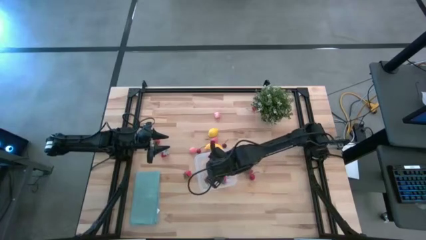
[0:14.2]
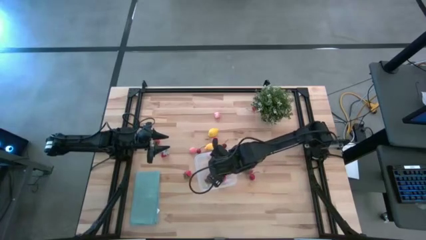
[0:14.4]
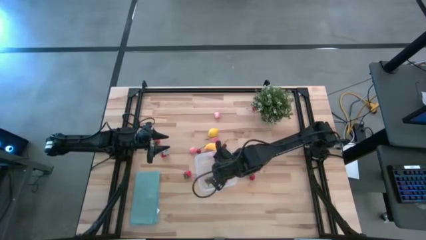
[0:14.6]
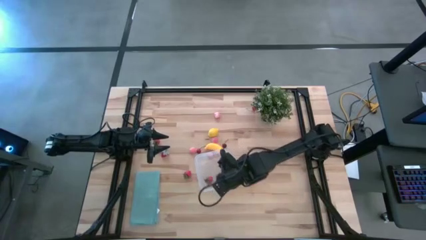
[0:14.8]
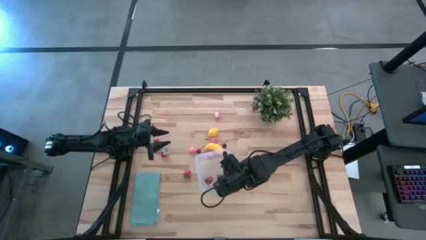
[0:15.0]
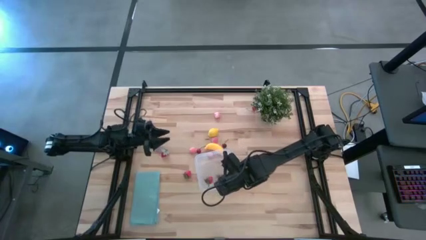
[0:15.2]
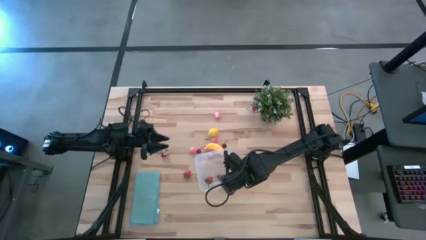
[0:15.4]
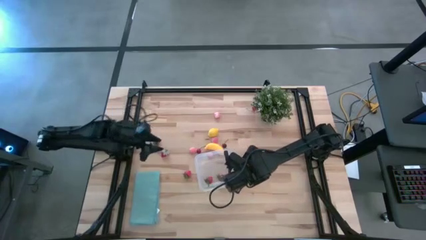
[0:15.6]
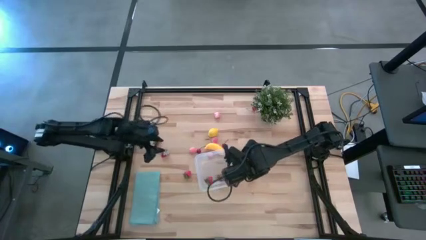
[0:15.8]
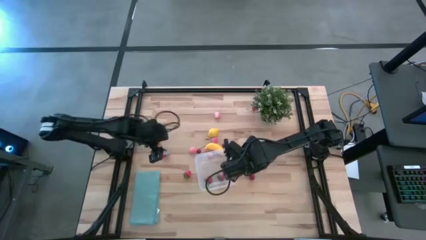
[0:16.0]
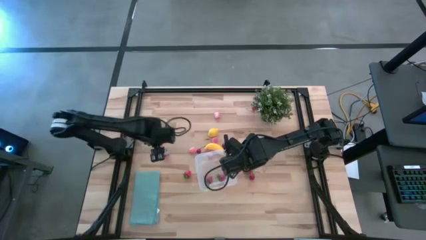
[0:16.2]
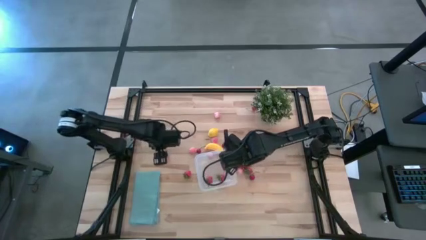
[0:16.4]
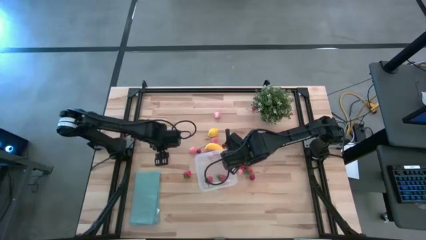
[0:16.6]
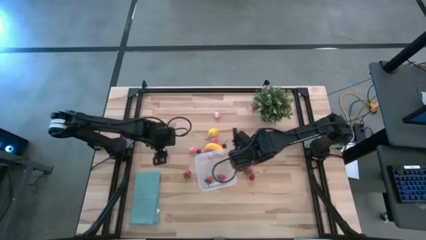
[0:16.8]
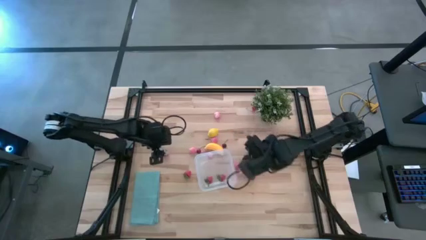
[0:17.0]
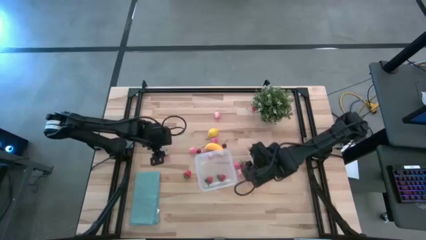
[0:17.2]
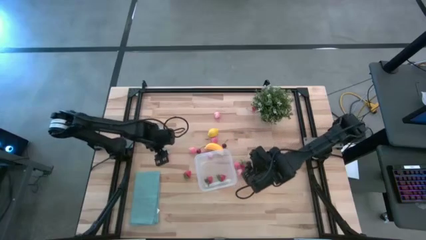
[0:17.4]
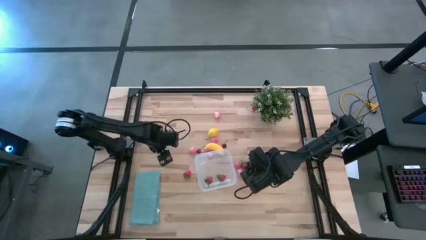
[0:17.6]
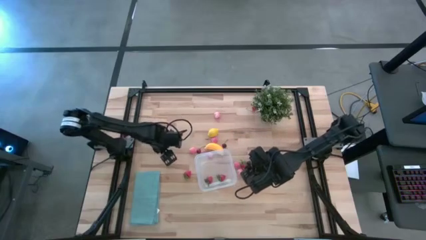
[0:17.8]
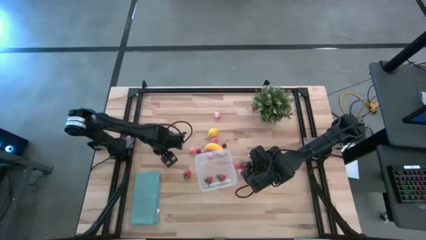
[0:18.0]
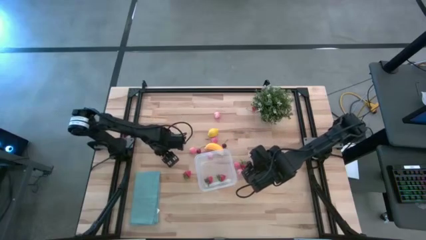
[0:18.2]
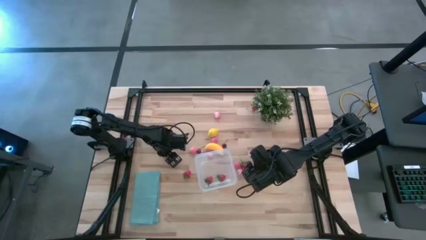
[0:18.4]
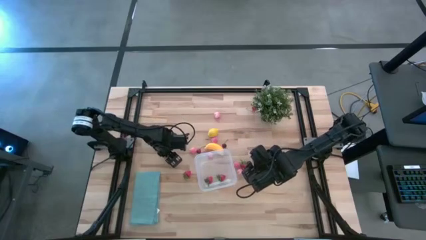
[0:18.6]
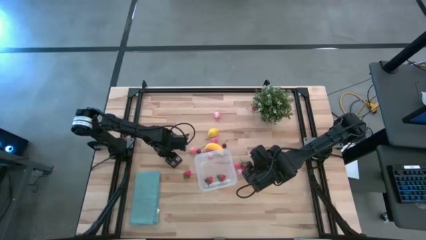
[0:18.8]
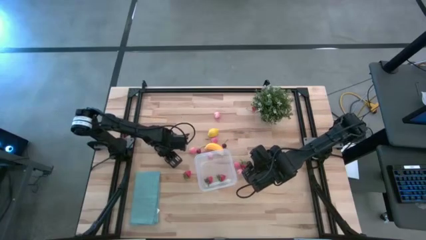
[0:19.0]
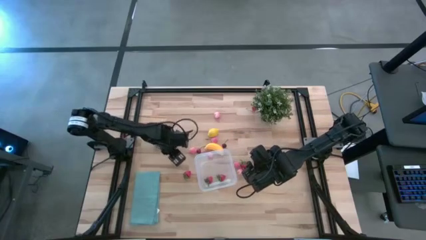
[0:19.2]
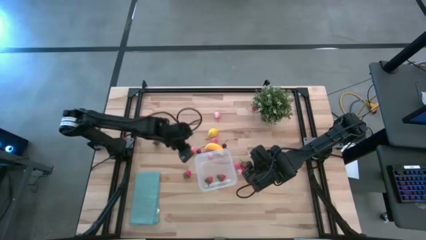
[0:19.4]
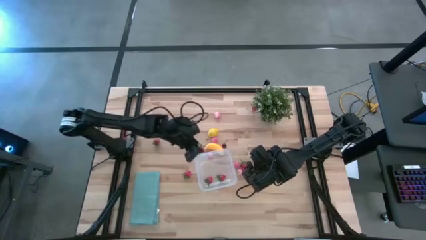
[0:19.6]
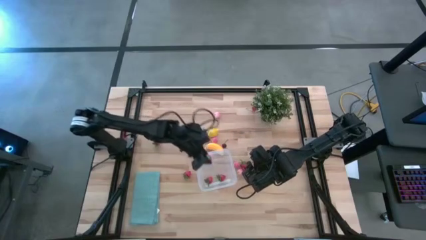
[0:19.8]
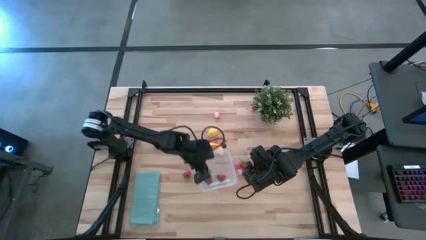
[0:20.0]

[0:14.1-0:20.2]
Task: Pick and placing Produce into tupperware
Put the red strawberry into the transparent bin

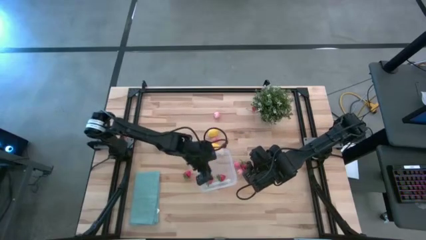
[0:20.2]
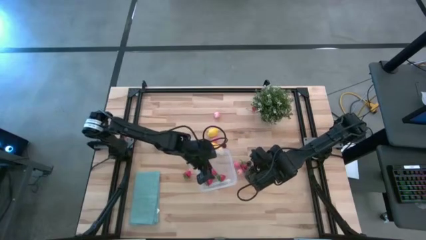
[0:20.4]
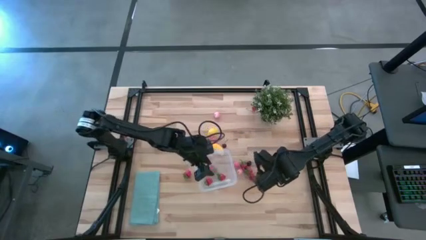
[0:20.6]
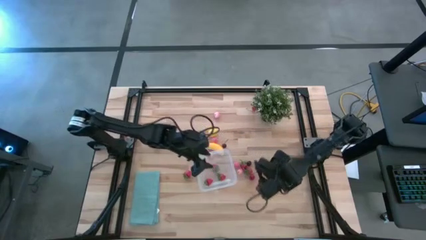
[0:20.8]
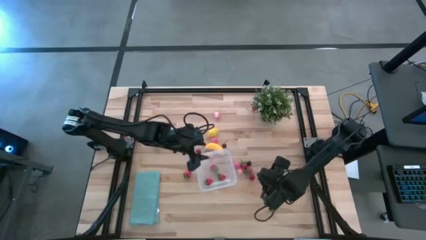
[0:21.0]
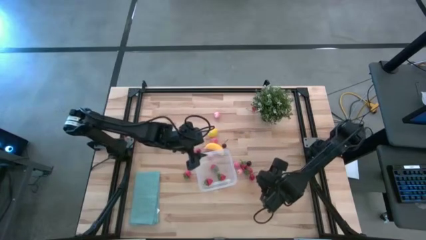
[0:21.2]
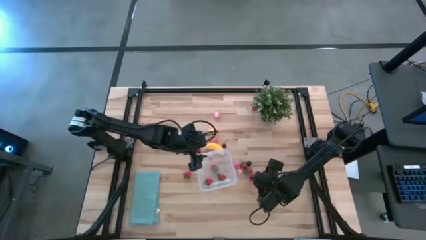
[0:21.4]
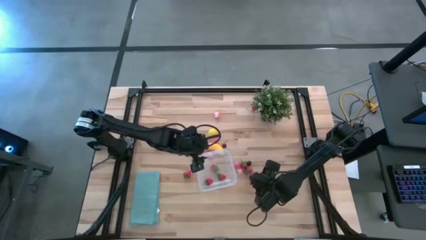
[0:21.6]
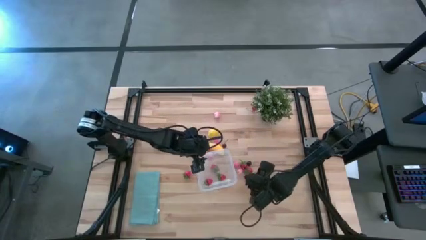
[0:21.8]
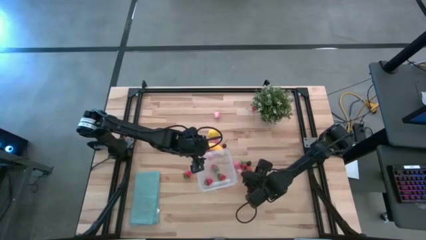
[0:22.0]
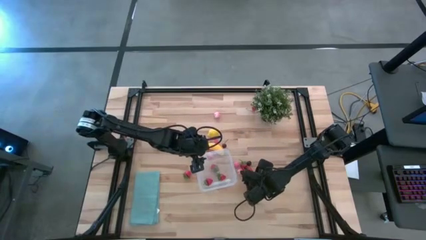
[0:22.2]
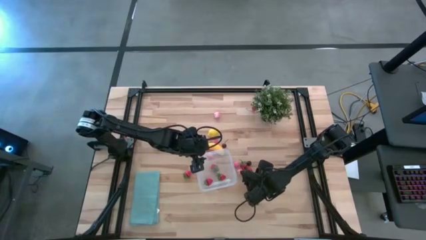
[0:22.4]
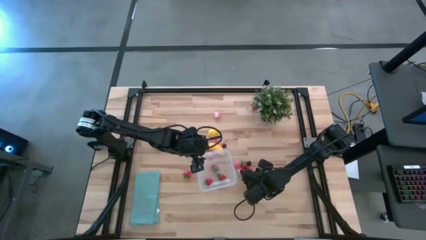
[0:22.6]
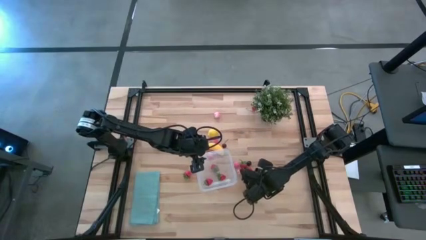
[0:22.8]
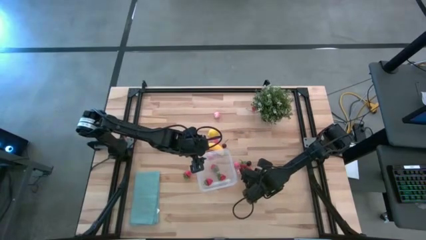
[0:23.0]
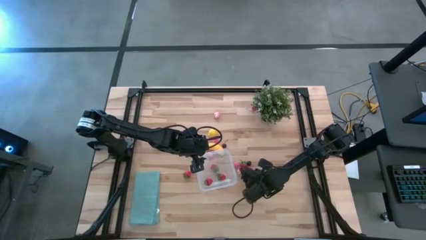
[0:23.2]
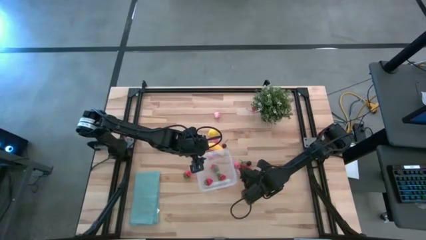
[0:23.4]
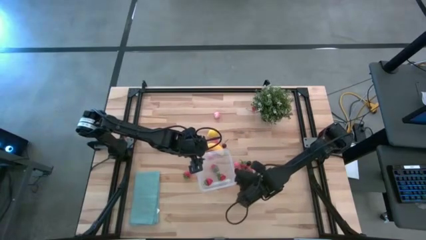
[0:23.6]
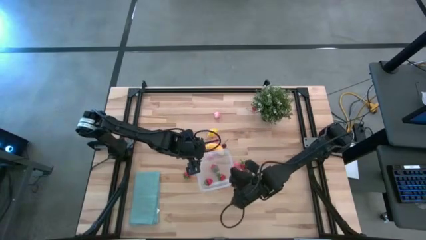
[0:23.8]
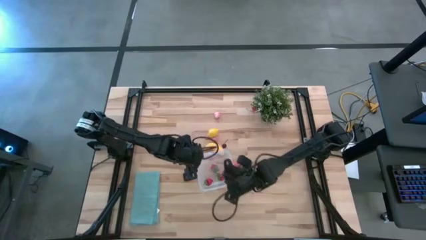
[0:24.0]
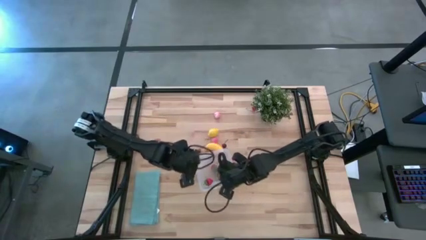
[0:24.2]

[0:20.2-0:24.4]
Put the red cherry into the transparent bin

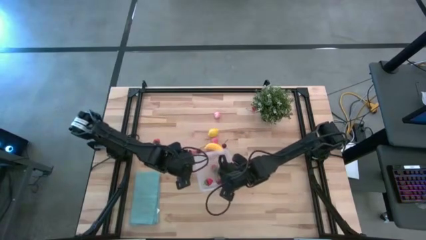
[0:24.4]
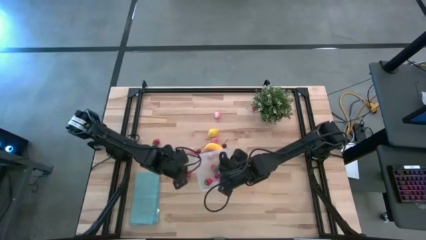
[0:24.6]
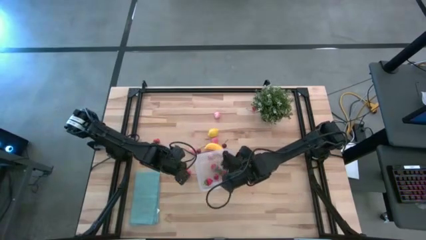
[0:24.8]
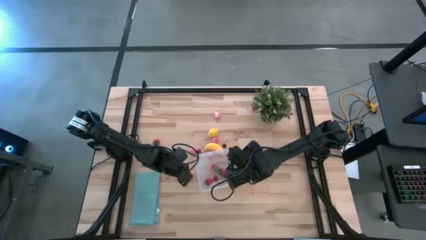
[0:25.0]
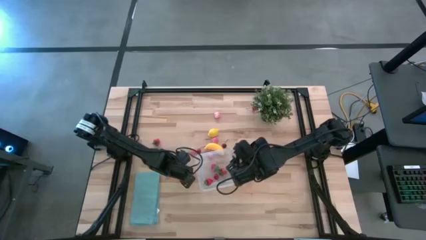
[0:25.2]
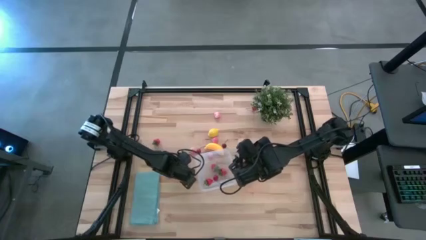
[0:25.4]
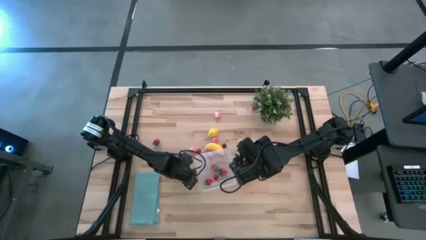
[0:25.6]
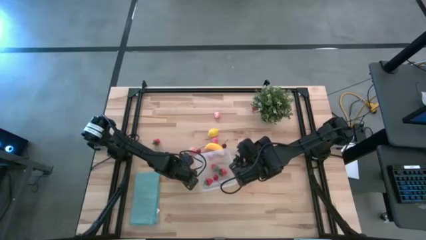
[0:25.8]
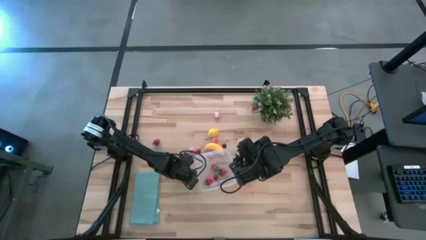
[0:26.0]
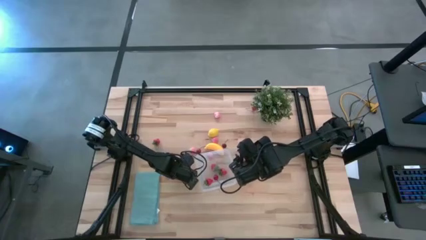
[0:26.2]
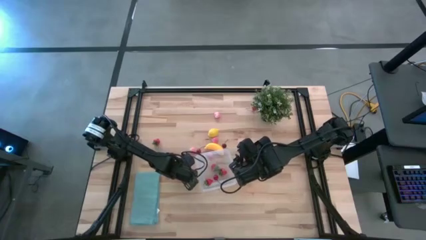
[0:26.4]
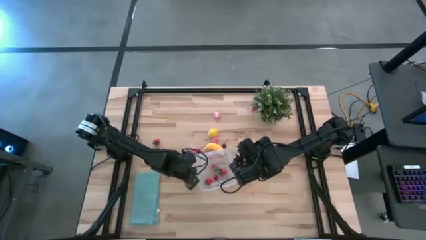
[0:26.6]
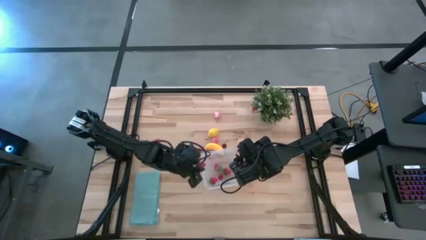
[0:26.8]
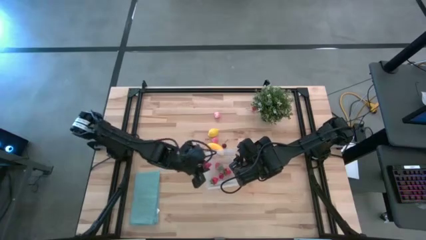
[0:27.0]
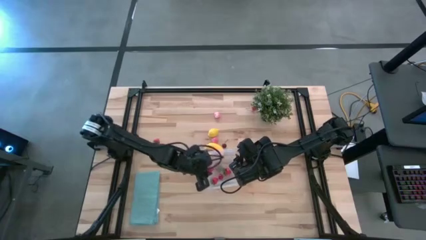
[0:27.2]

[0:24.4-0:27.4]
Put the red strawberry into the transparent bin

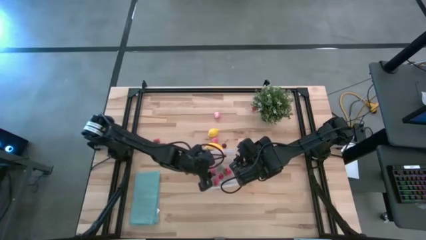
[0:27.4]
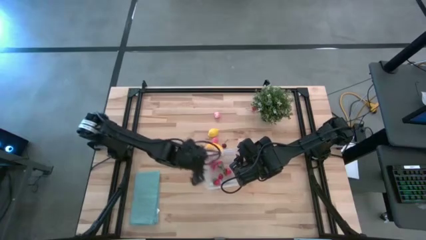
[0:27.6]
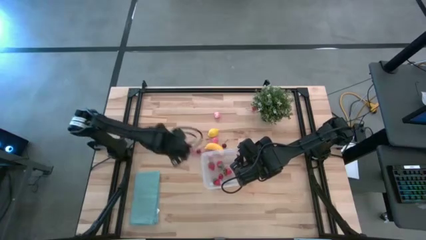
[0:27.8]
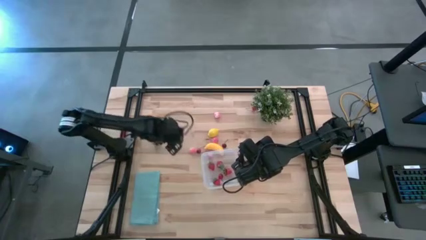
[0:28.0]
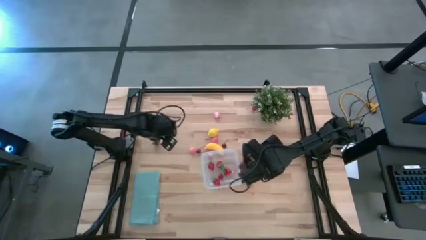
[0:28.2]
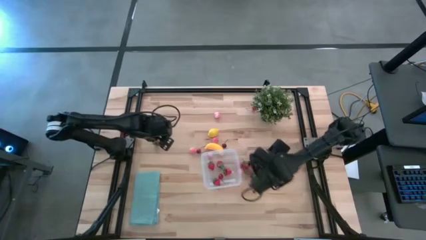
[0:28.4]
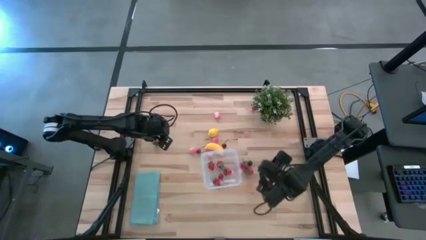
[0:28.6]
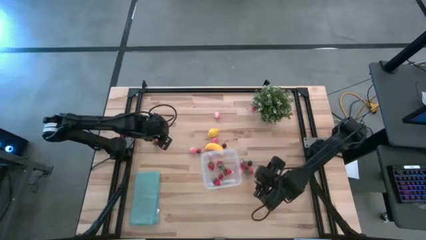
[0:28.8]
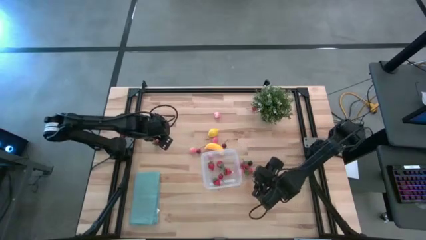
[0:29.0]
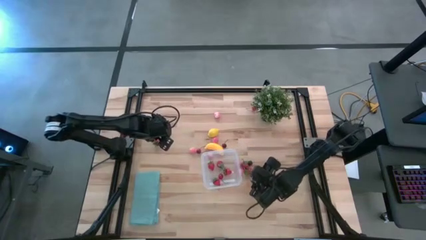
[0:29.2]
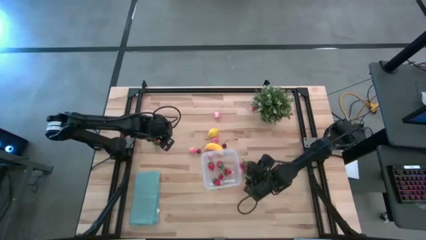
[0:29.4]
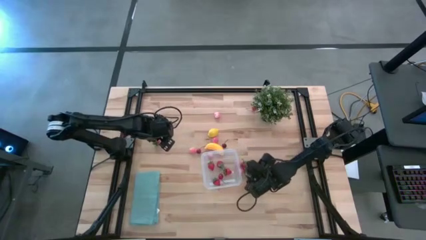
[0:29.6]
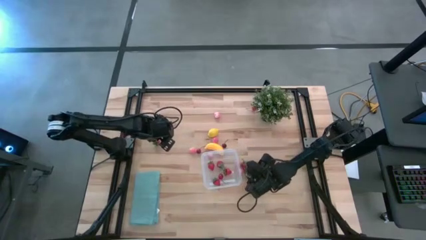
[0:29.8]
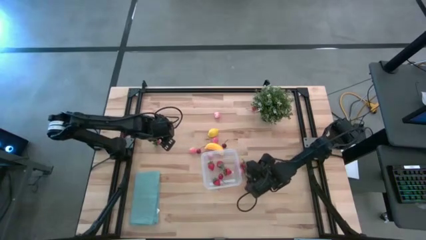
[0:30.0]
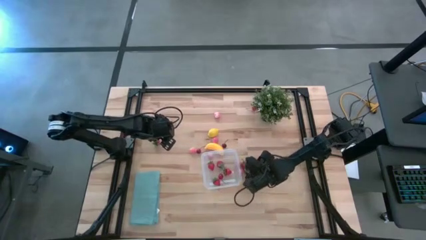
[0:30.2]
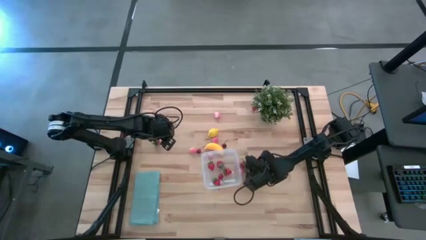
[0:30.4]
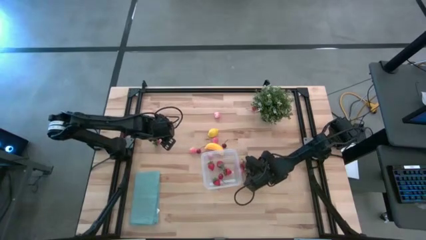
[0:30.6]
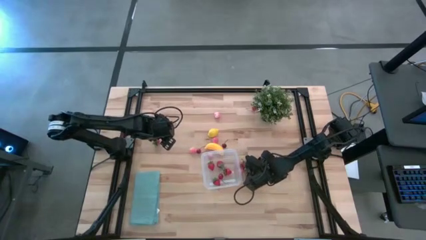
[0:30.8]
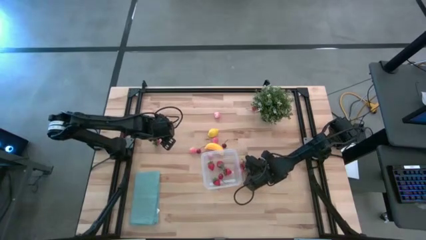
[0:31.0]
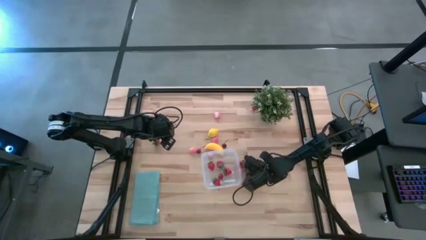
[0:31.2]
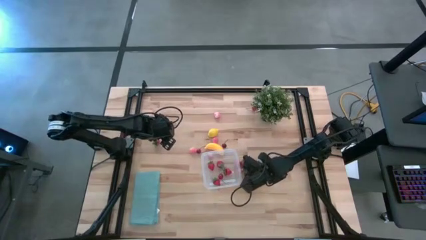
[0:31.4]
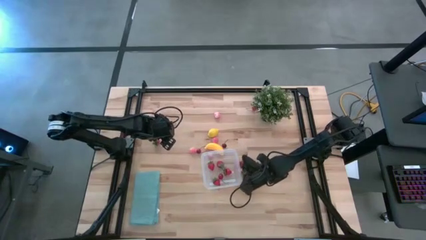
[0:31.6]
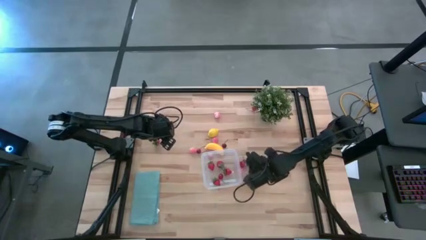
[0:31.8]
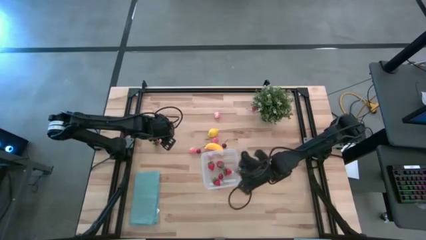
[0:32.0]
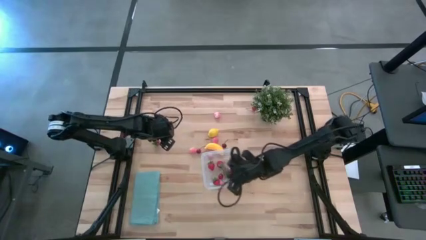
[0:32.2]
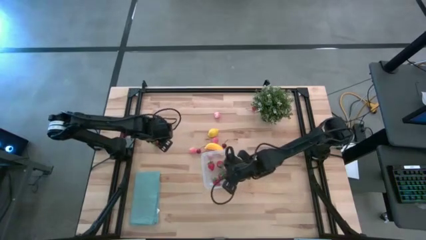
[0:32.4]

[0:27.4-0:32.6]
Put the red strawberry into the transparent bin
